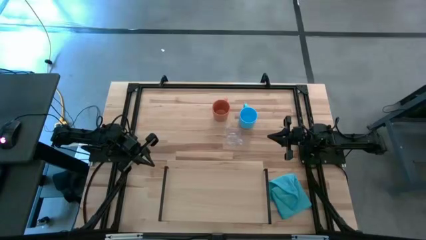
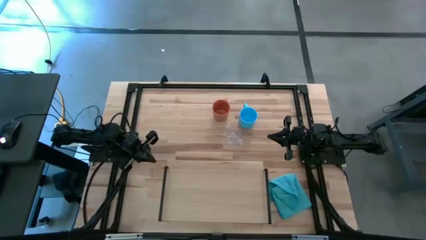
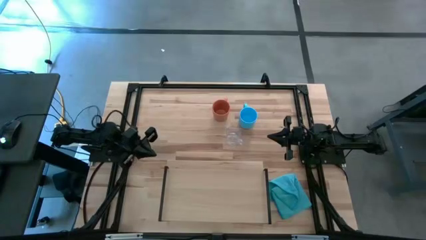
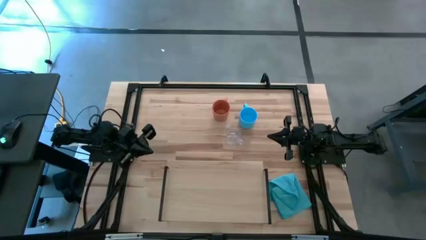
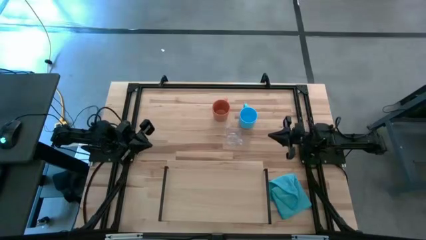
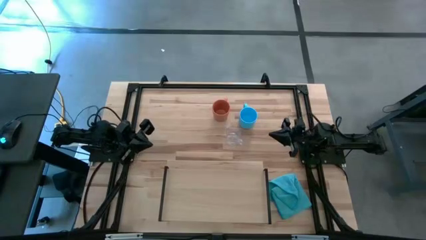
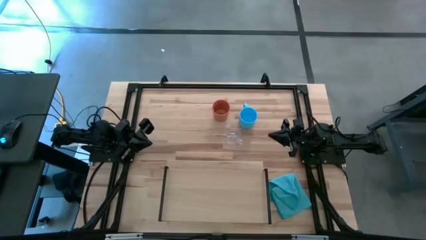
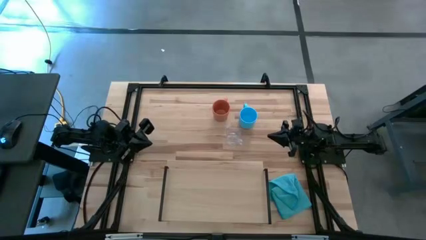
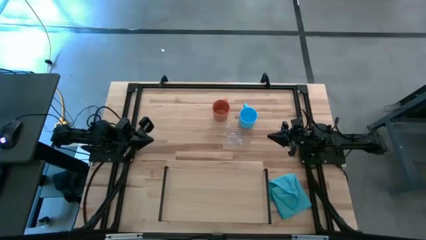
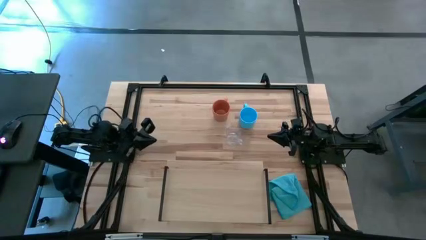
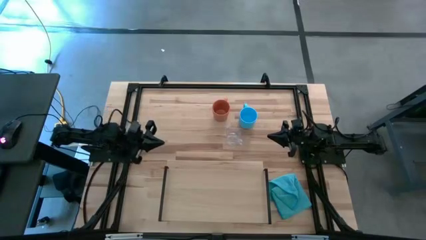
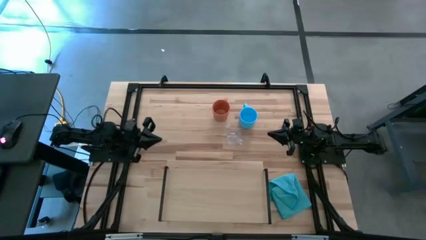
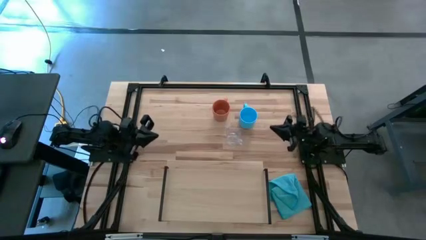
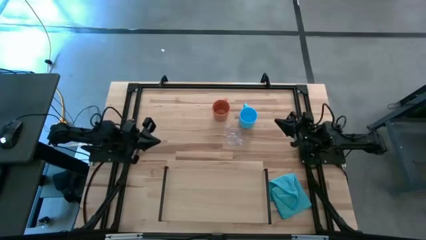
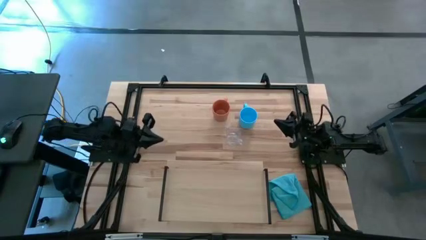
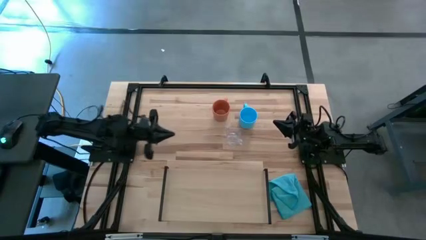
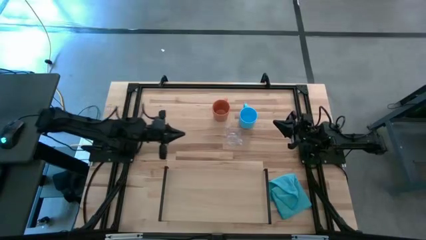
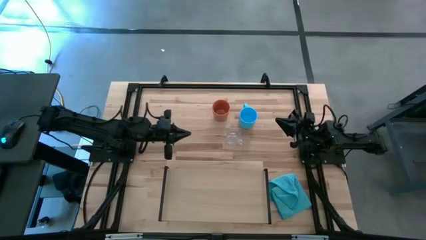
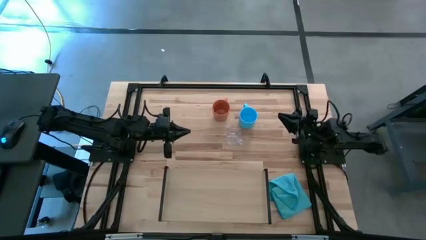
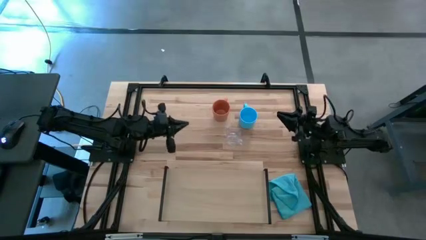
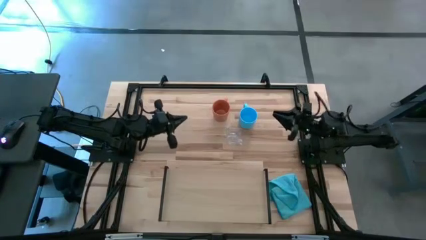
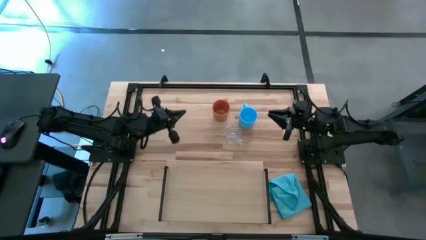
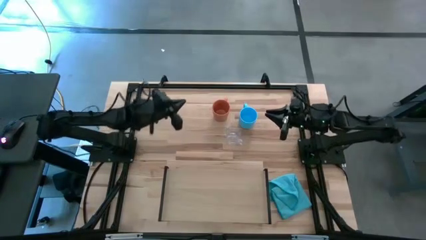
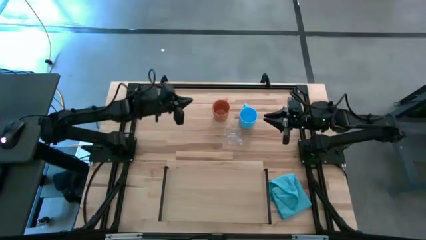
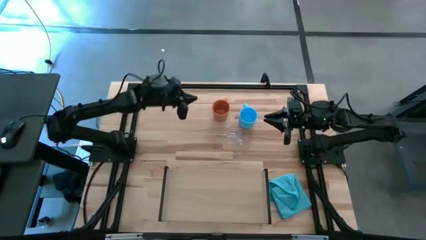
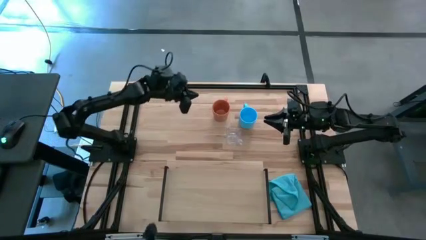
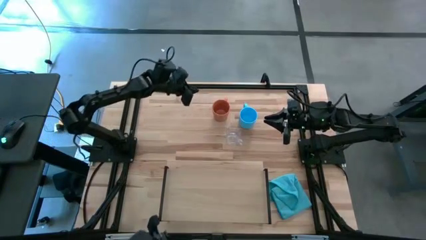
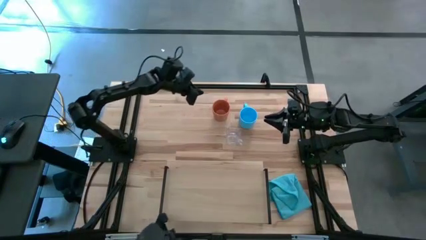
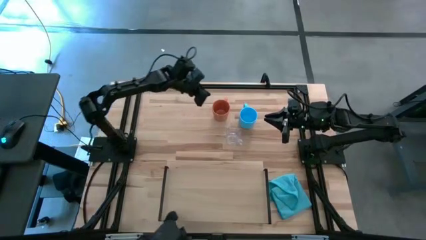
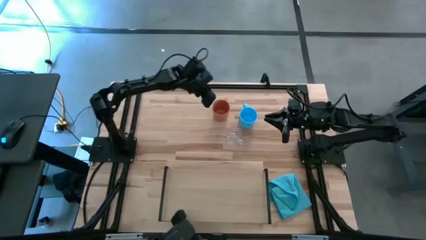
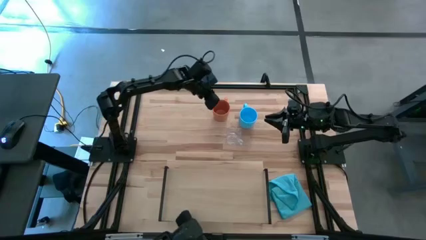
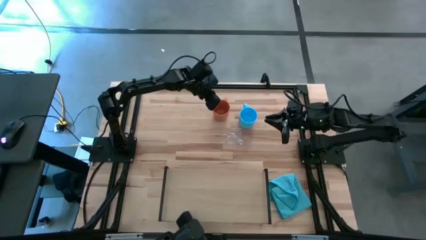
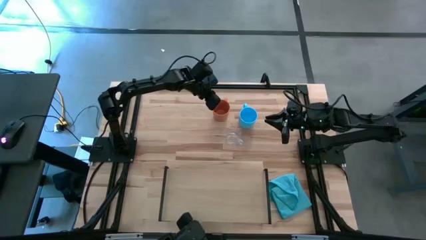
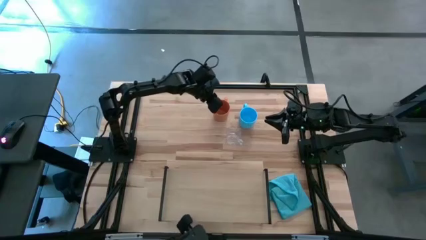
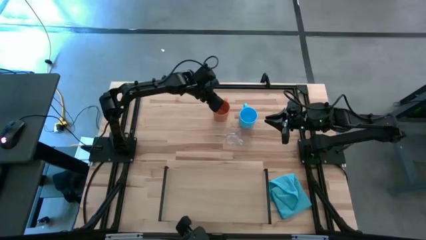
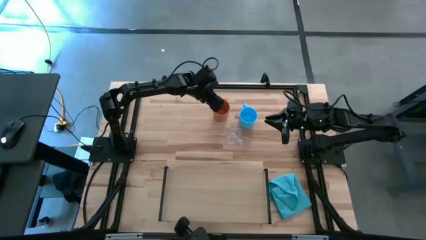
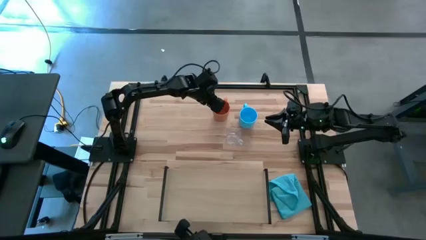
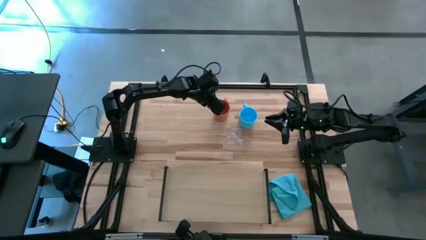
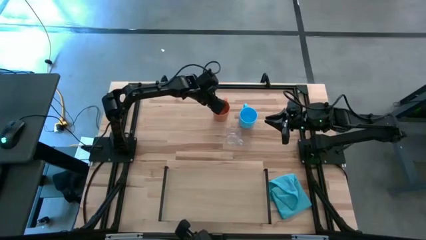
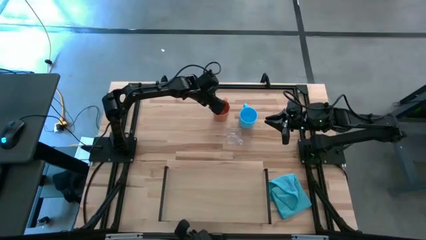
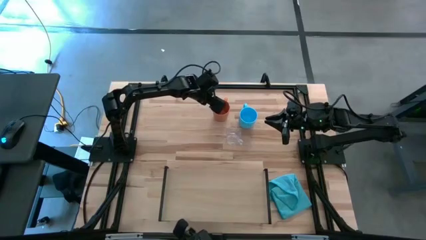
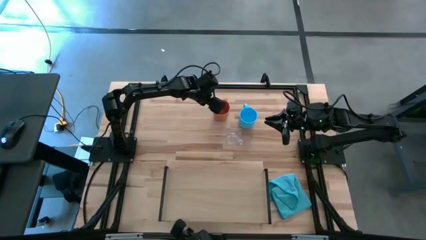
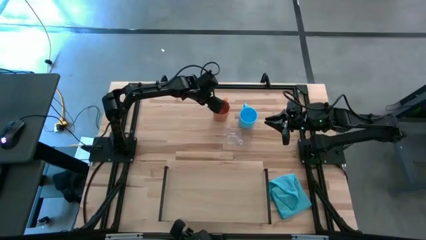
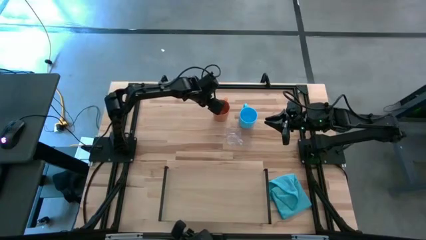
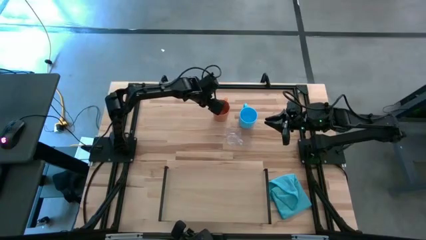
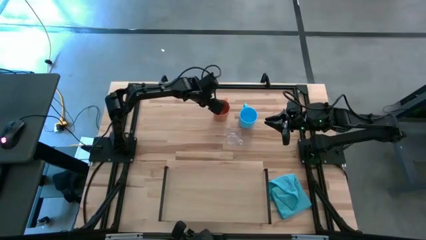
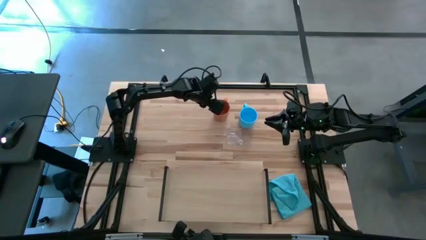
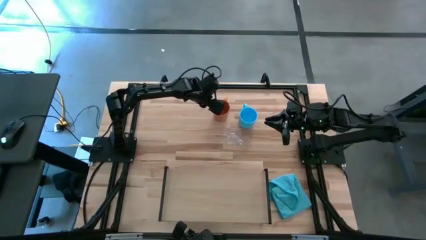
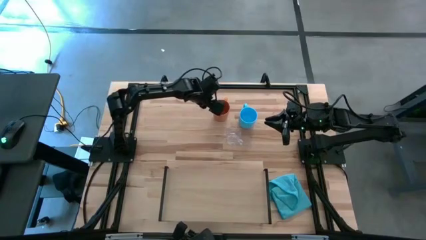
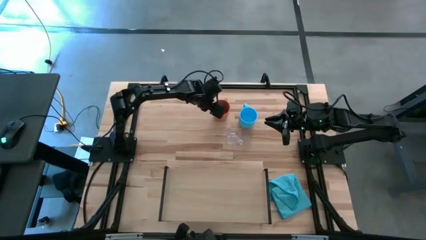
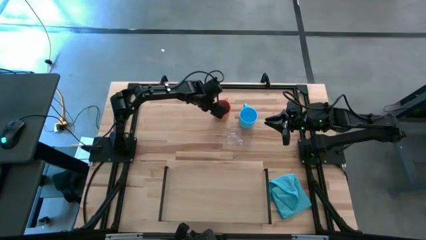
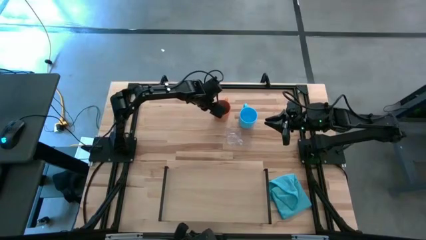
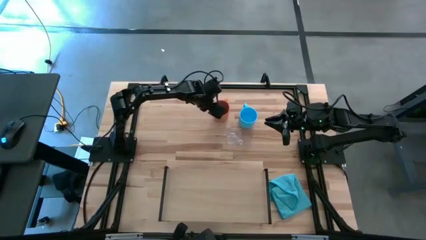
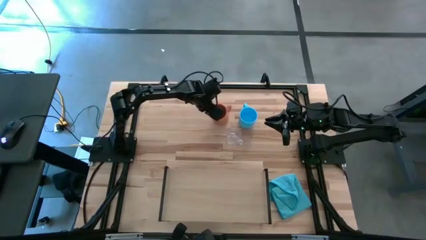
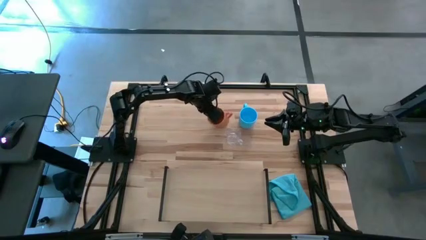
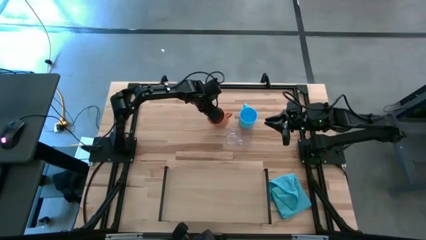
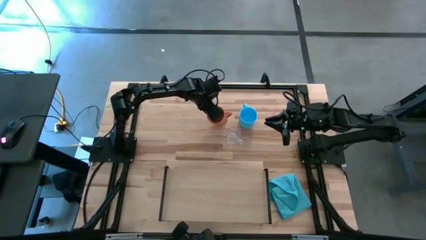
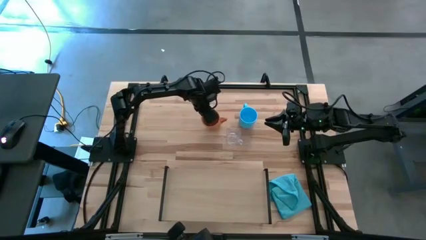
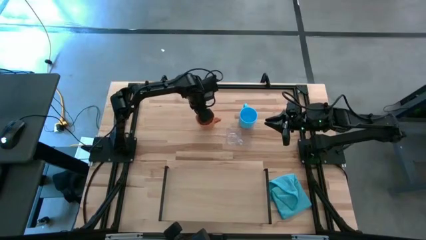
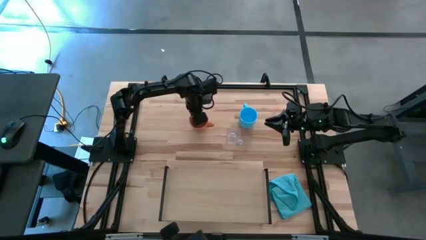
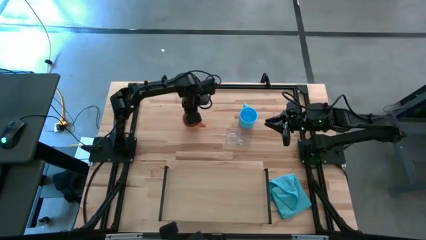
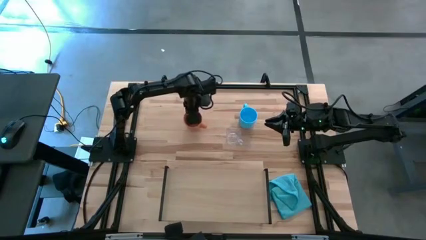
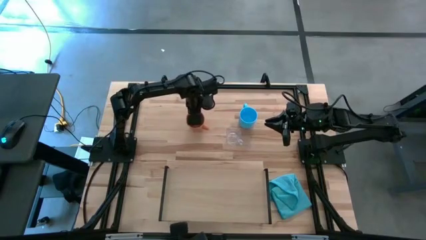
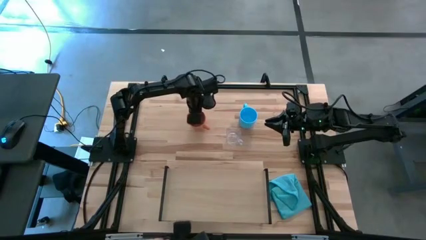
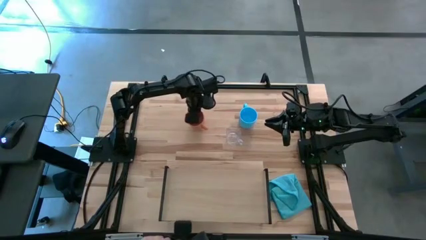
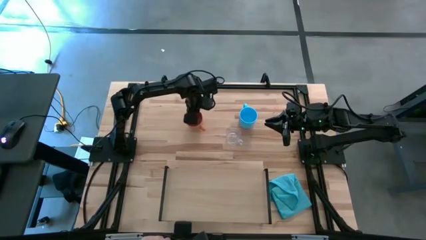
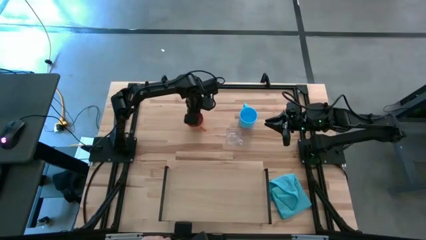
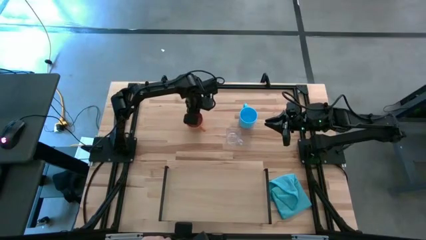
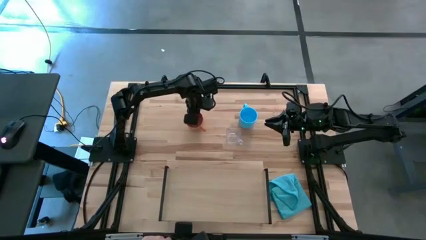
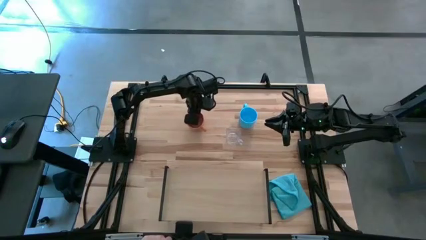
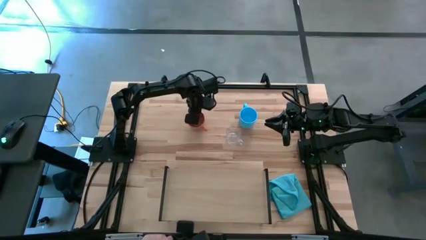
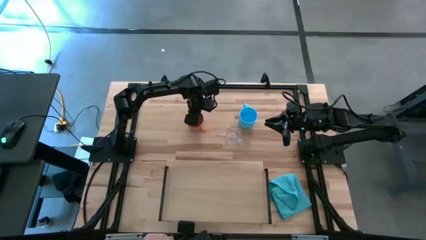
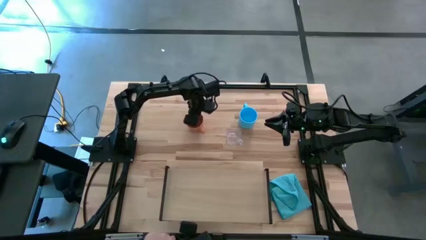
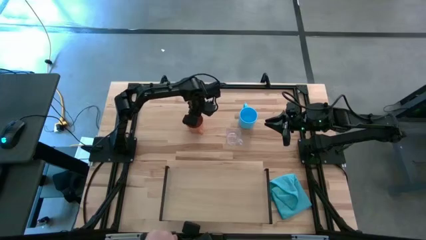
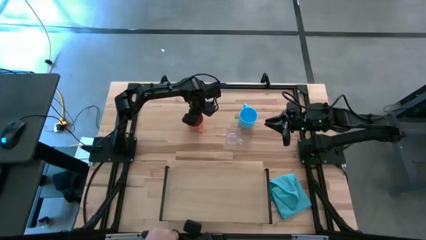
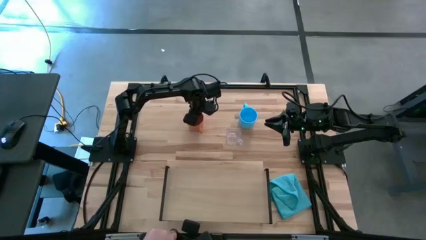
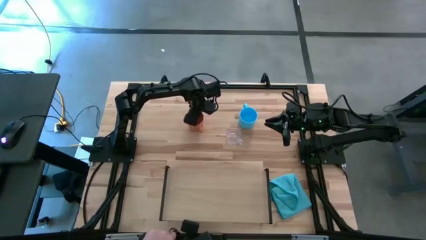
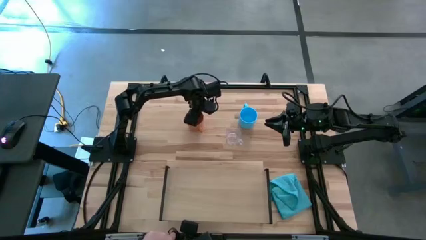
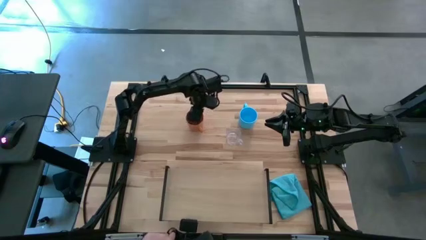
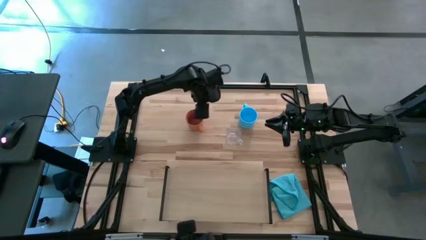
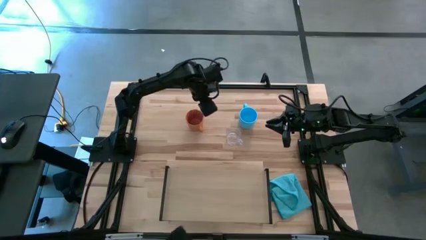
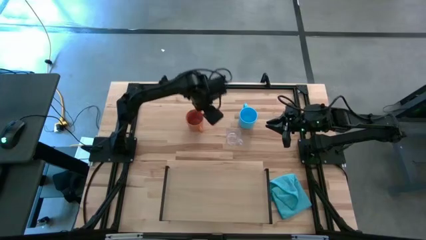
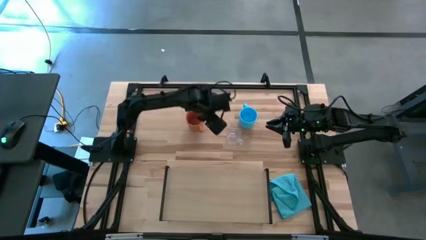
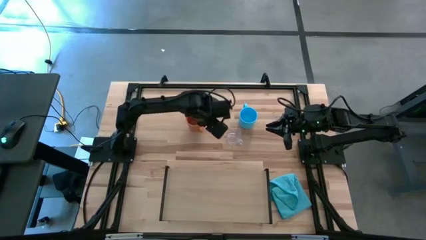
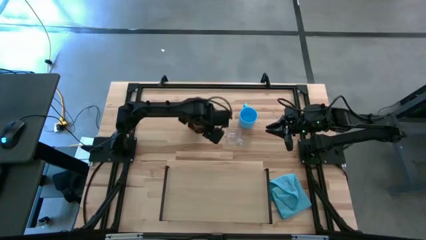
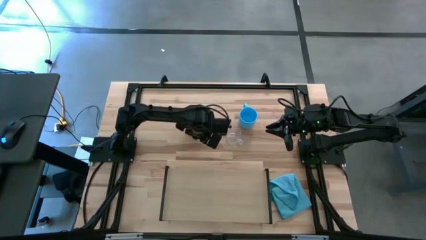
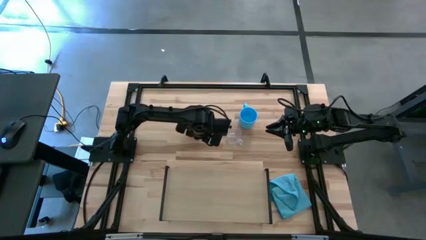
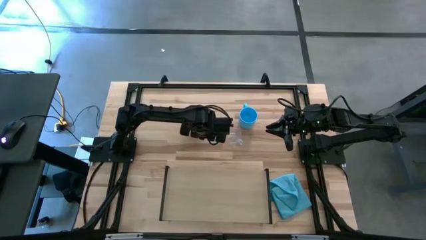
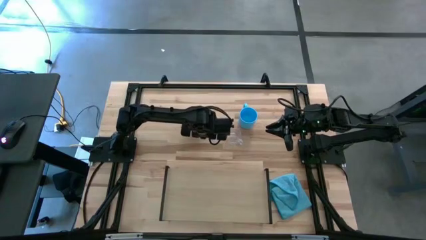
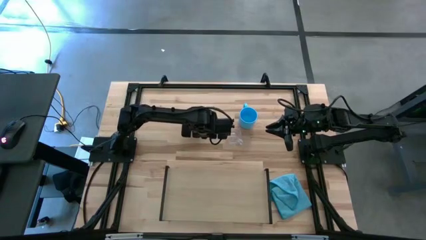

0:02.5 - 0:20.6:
Task: Stack small to large cups/mugs on shelf
Put the orange mug on the shelf
